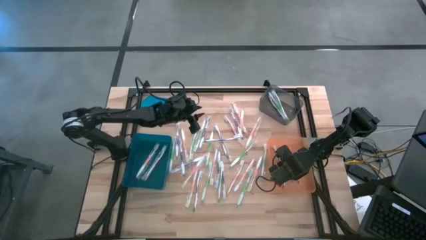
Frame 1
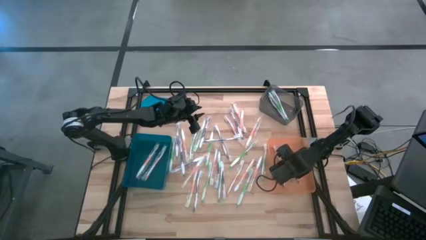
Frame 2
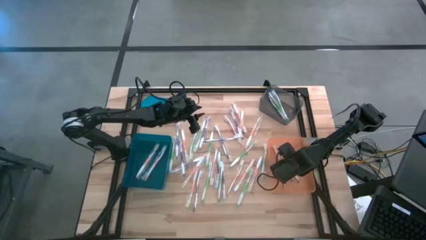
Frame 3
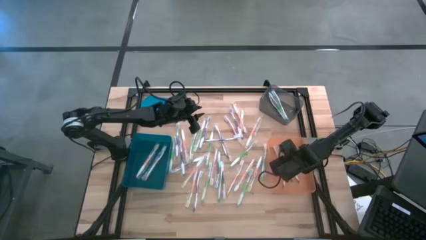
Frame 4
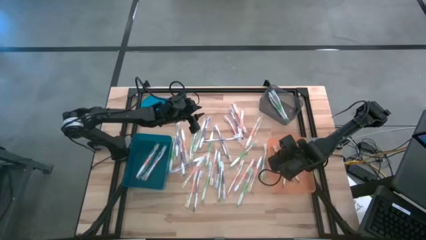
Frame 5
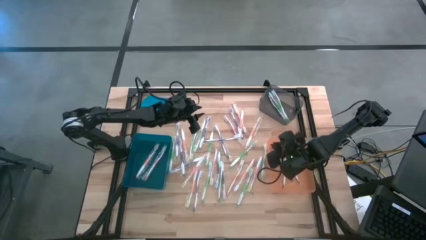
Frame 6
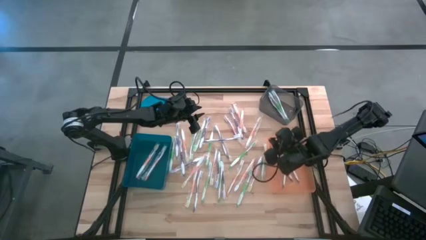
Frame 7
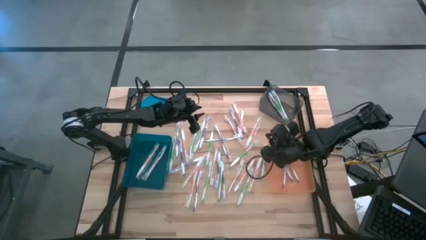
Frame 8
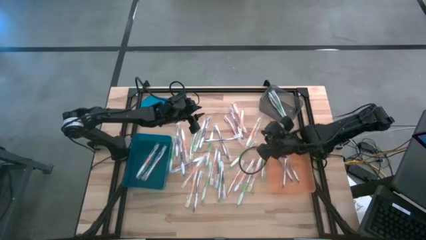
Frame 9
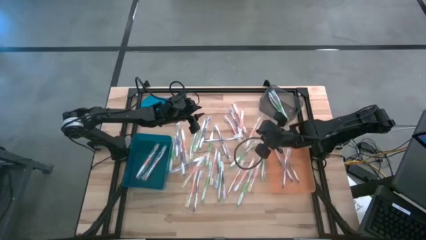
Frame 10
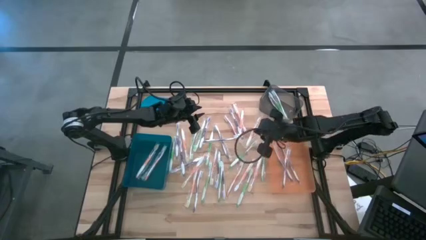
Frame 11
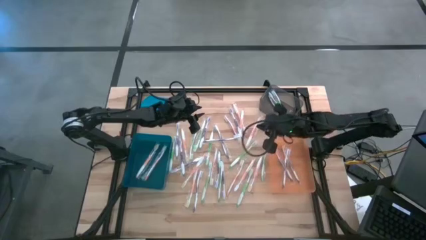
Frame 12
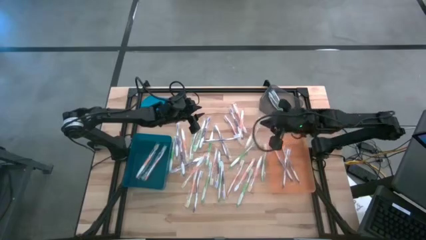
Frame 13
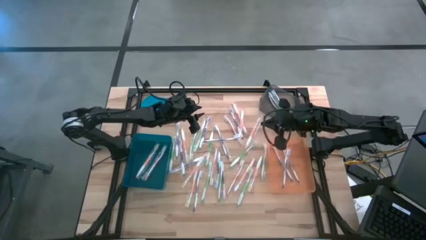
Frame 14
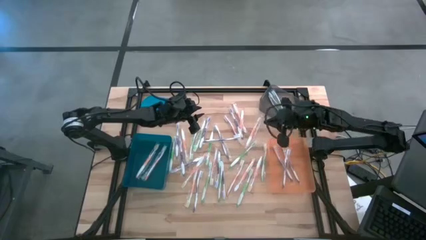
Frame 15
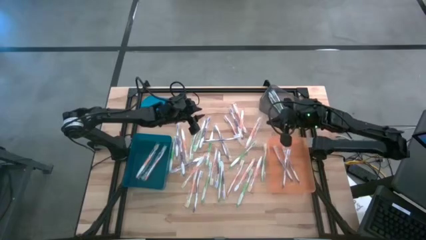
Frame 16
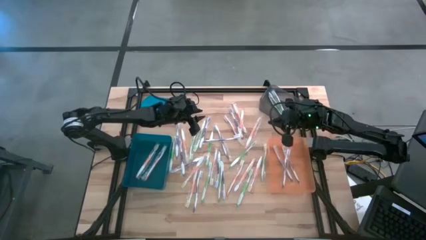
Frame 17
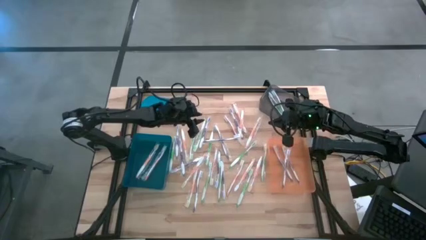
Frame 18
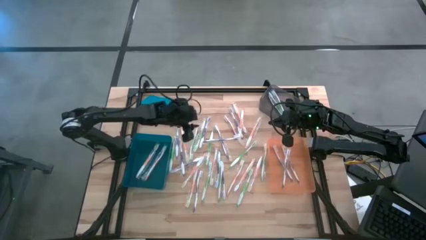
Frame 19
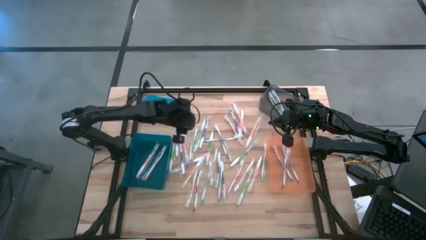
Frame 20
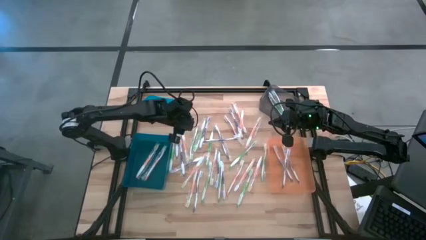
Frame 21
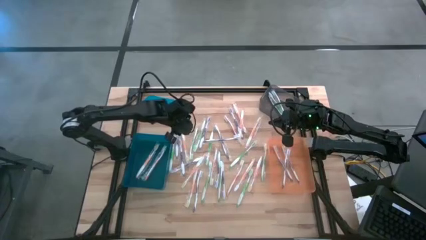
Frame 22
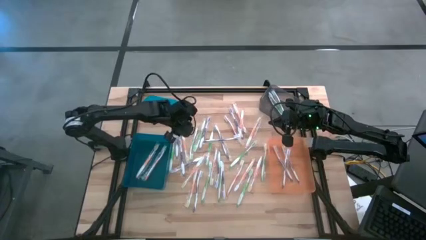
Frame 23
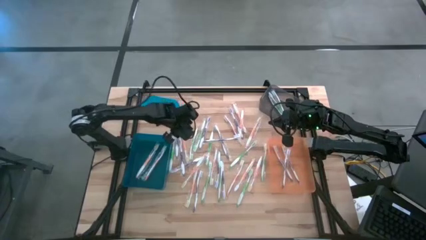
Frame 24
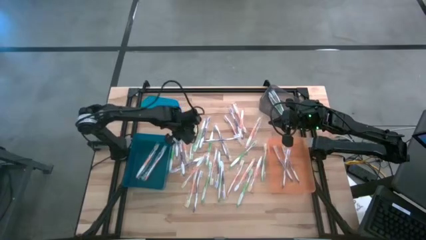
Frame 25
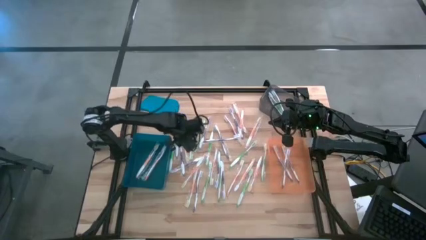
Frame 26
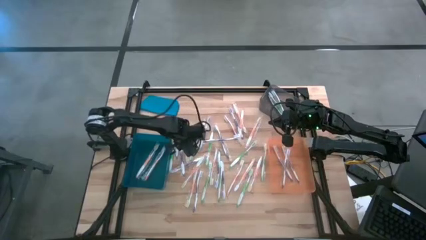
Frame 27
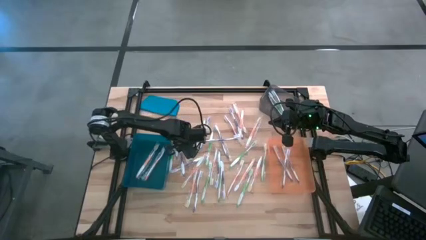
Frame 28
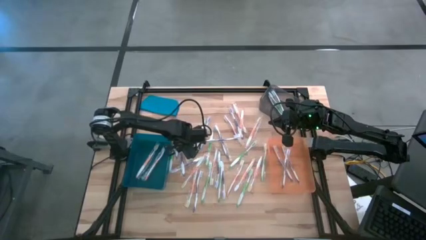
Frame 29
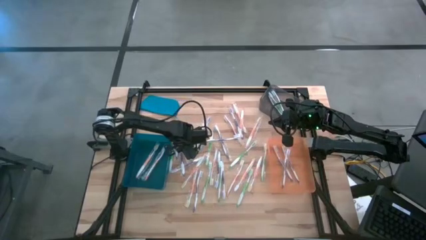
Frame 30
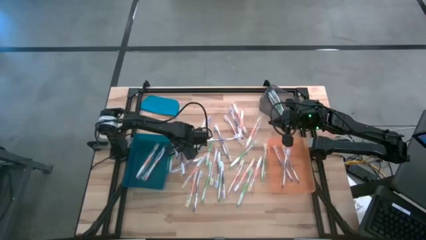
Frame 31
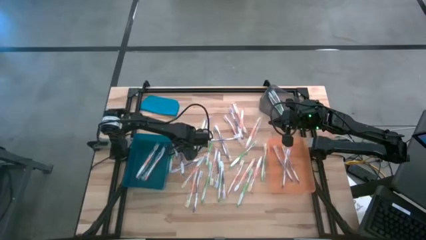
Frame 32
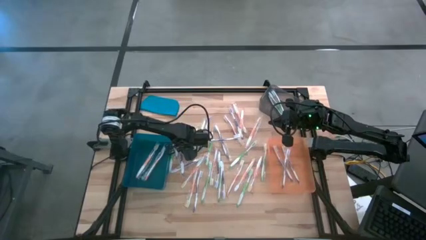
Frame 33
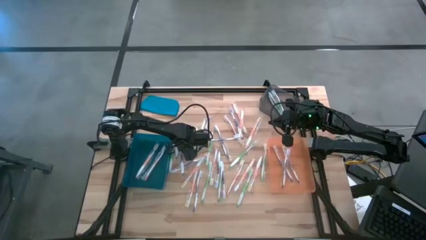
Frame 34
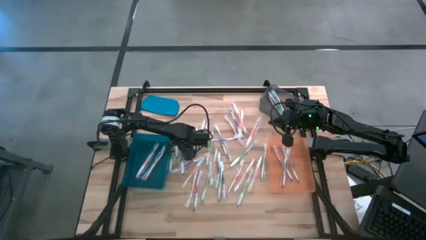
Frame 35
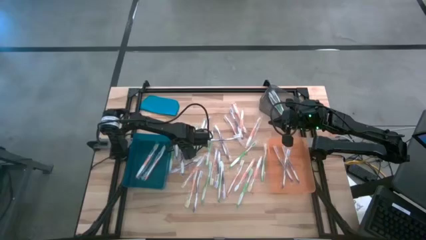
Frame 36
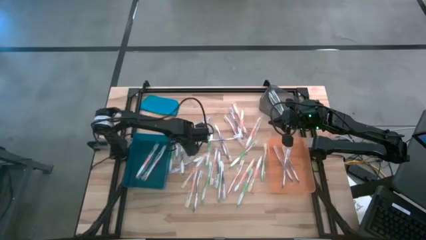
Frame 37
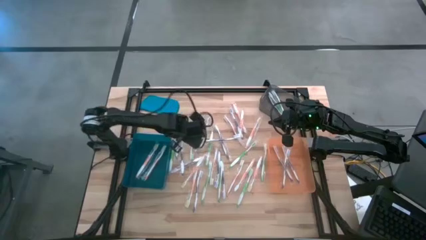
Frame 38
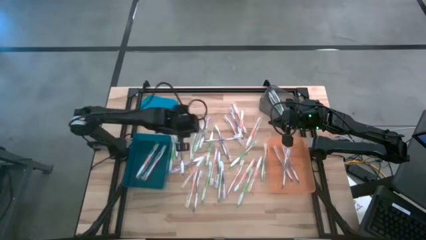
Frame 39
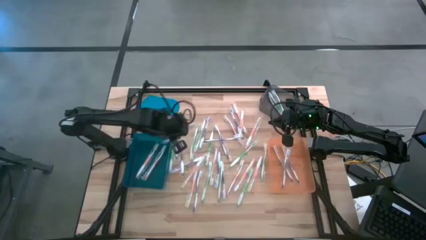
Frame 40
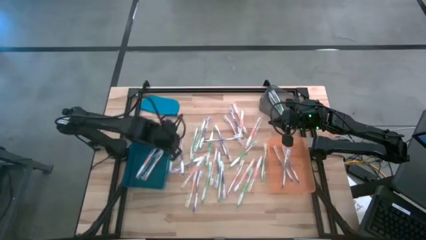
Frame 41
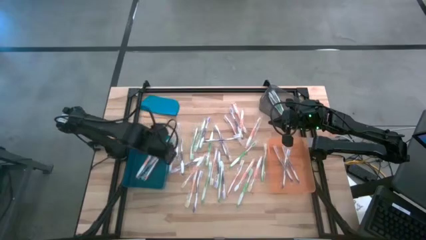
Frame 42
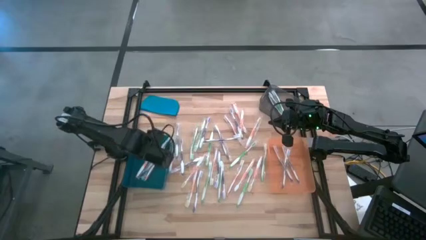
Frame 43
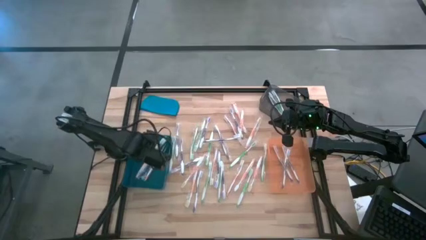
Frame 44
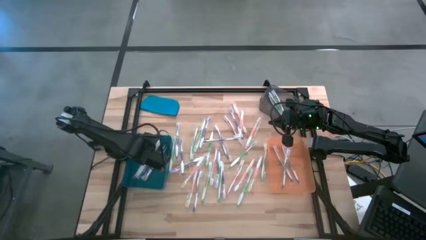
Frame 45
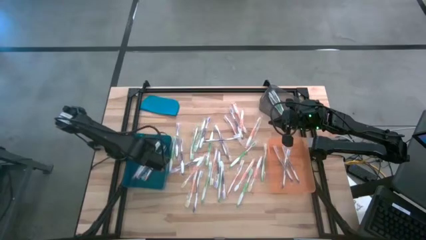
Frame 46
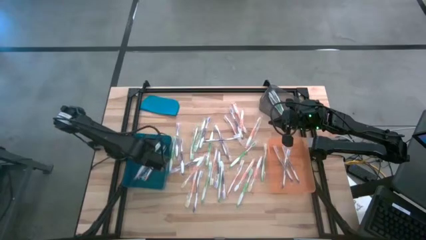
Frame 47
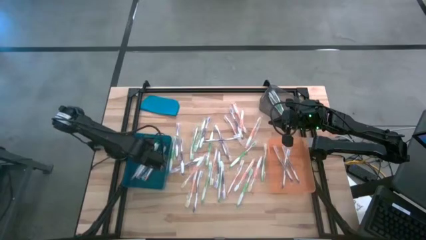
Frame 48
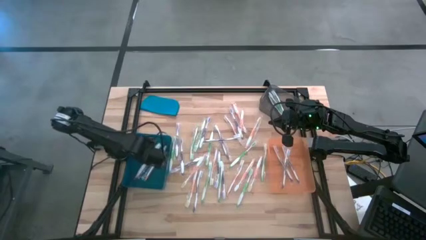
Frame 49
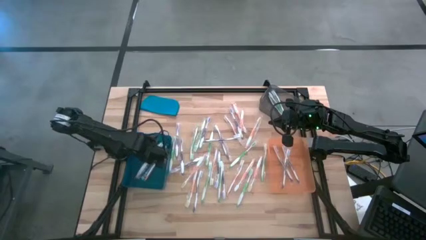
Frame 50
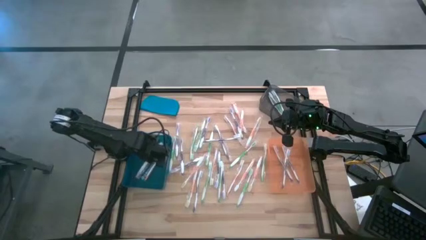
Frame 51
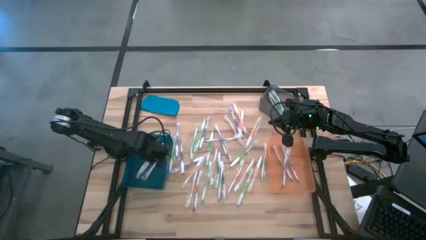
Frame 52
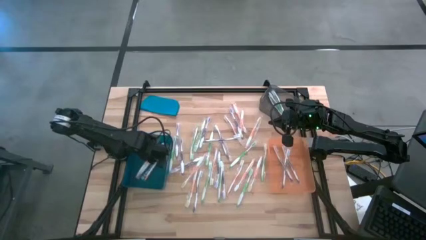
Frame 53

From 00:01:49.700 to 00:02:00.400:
Task: Pick & Place Toothbrushes
Put the orange toothbrush into the blue bin

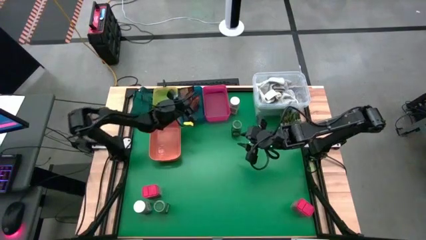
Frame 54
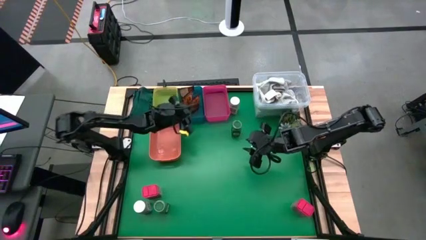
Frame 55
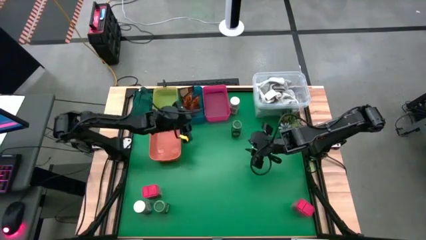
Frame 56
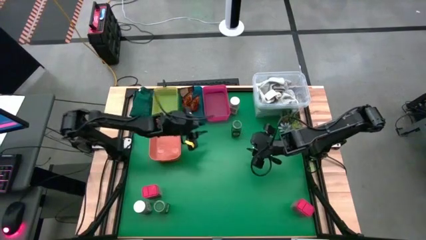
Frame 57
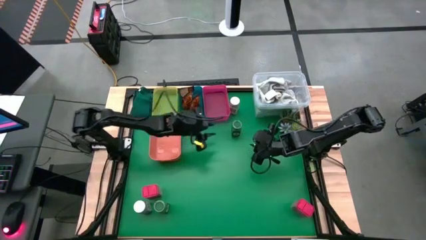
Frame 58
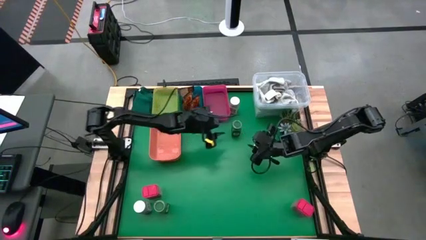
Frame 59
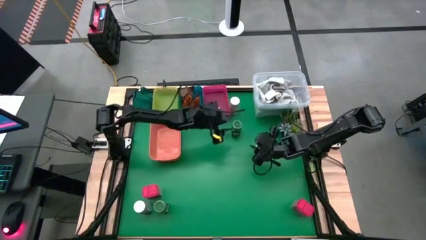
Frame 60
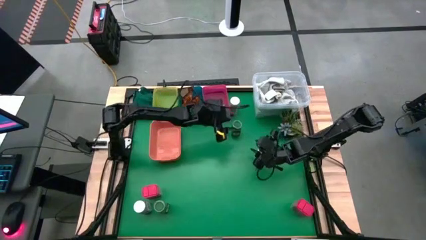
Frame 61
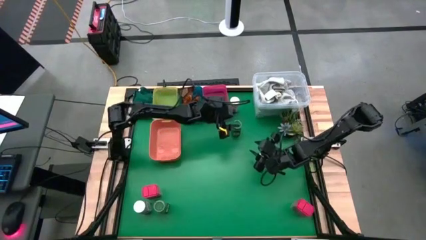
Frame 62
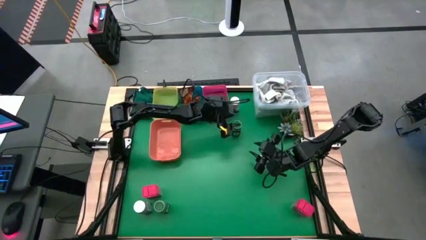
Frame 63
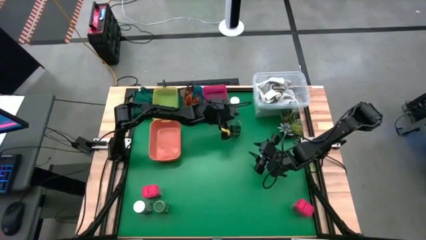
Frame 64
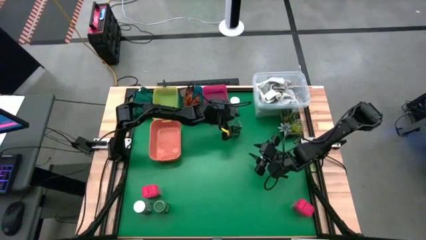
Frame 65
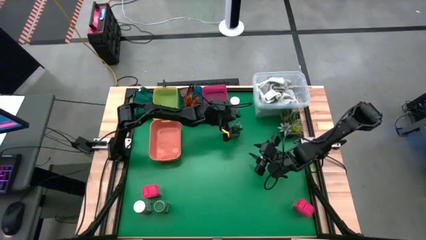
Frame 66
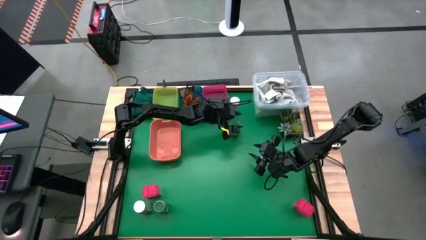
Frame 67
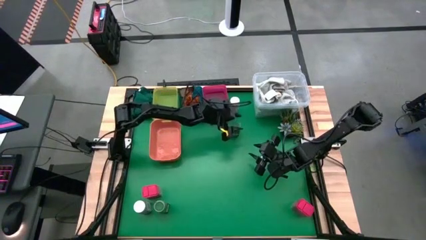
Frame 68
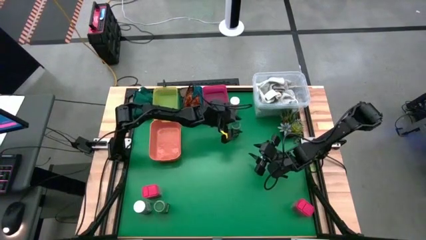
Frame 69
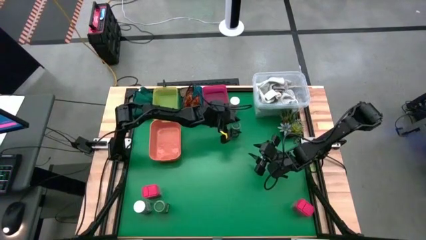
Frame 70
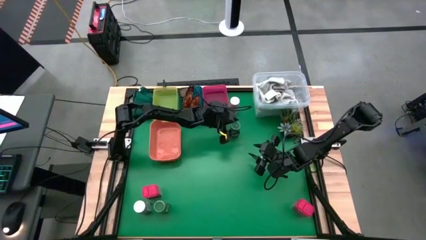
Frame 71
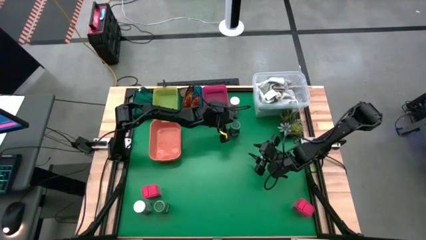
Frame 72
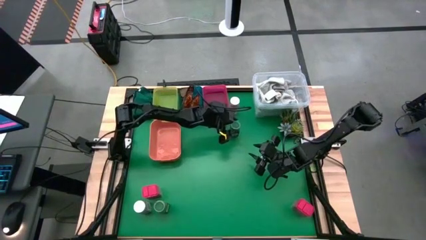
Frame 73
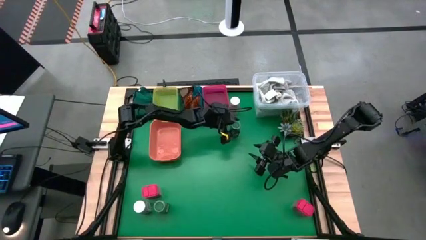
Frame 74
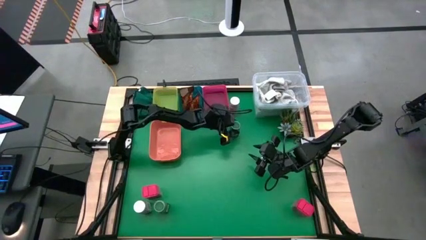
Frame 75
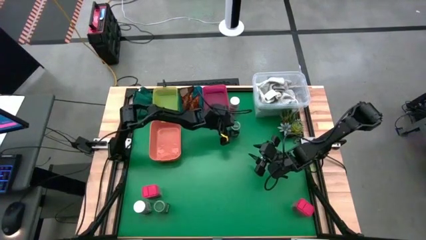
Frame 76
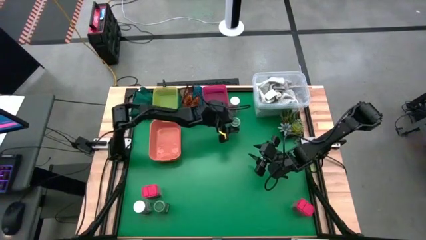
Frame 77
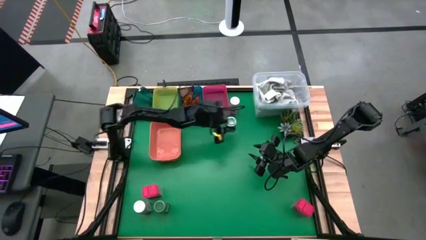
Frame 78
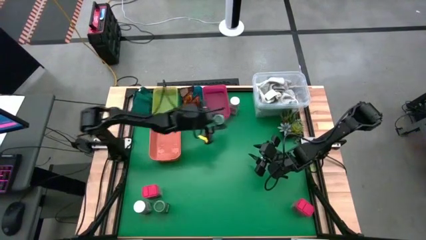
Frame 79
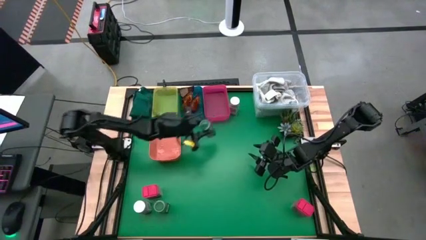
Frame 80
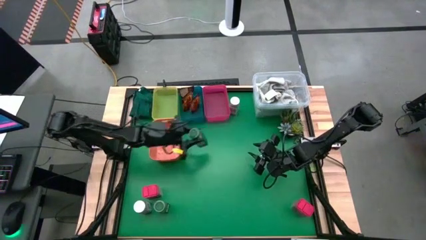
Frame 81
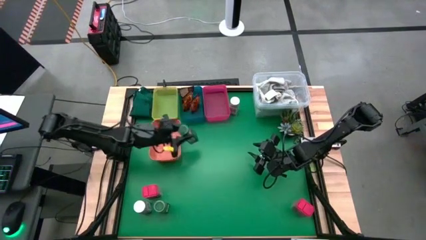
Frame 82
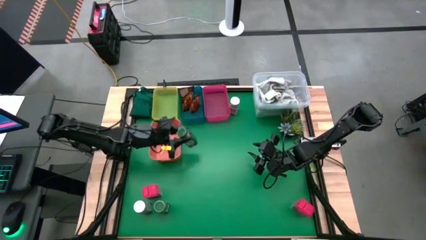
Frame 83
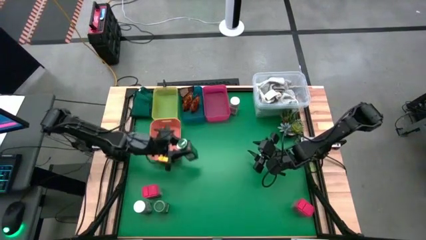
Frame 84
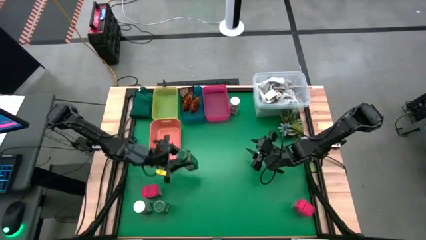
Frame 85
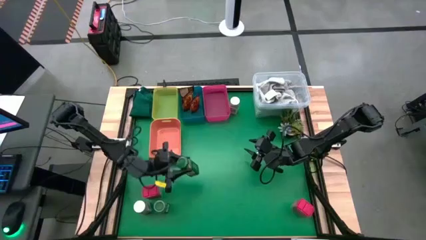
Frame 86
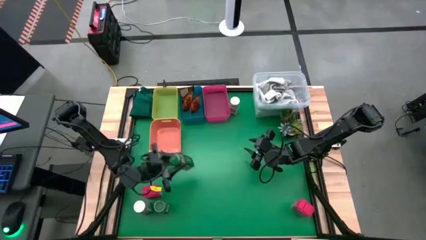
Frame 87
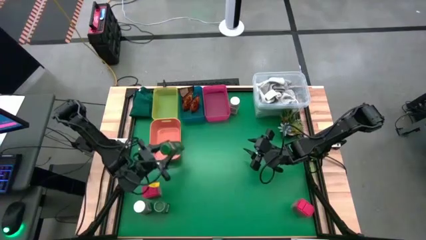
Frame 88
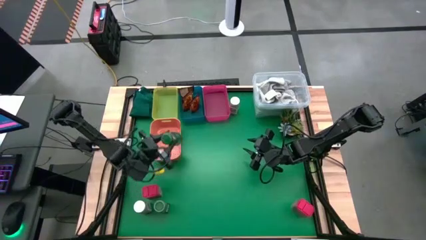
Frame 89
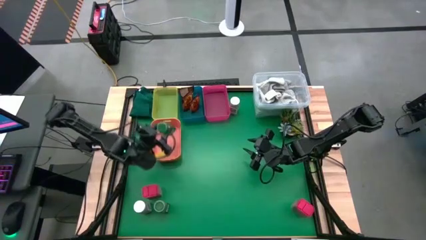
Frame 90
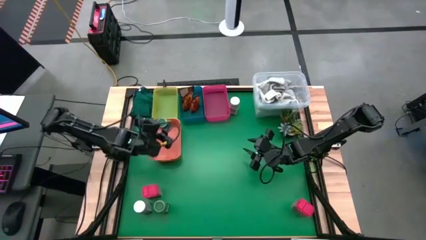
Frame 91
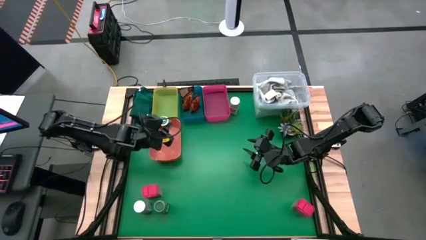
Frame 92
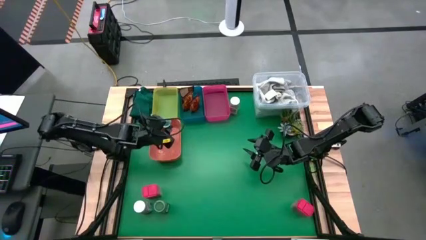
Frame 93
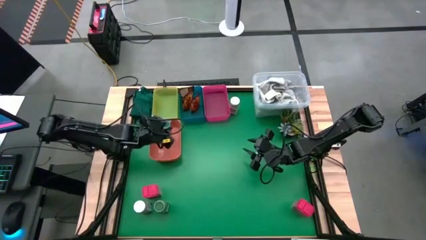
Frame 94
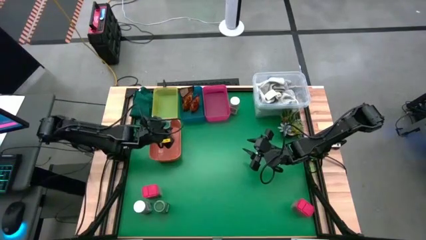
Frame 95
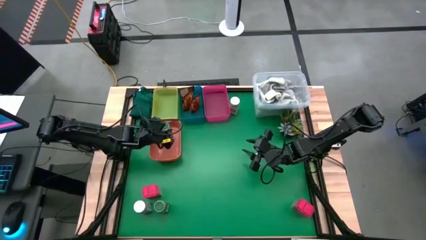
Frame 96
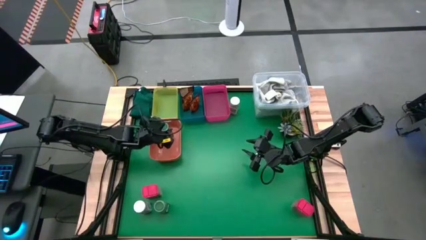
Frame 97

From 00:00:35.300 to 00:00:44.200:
Task: Sort spices by type
Put the top green spice bottle into the orange bin
